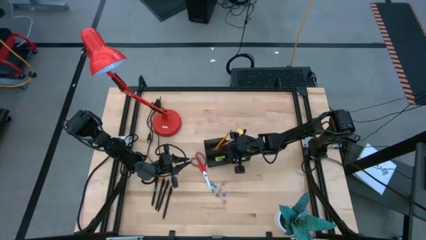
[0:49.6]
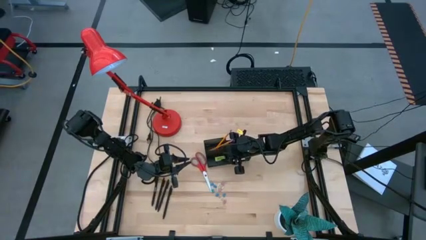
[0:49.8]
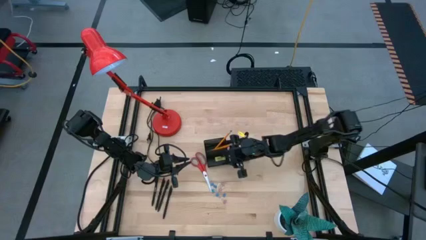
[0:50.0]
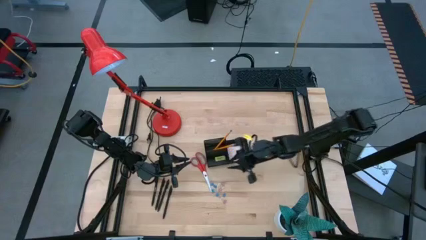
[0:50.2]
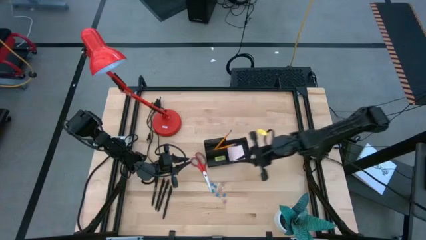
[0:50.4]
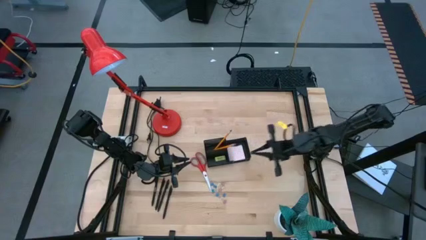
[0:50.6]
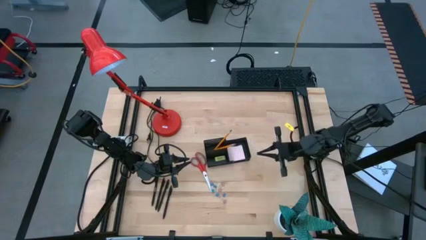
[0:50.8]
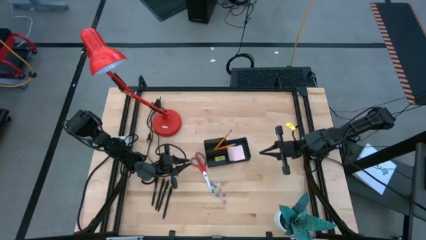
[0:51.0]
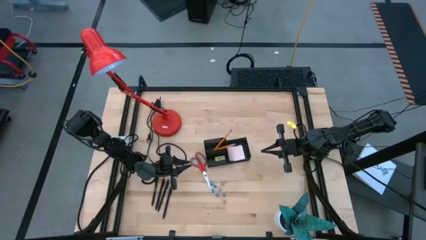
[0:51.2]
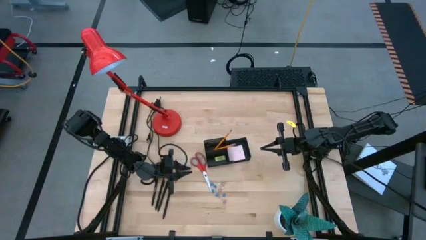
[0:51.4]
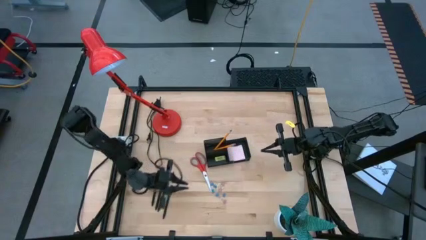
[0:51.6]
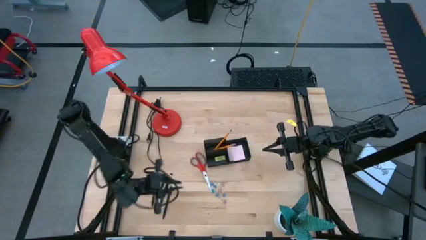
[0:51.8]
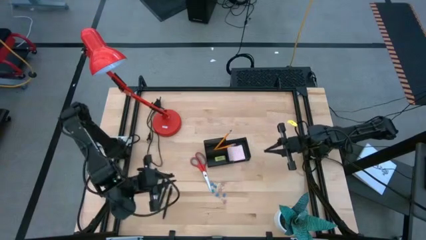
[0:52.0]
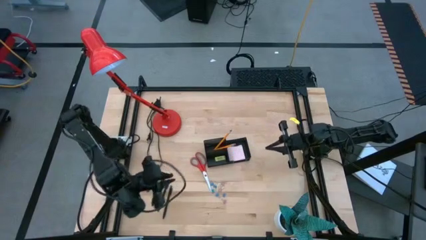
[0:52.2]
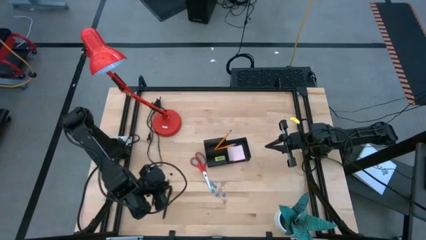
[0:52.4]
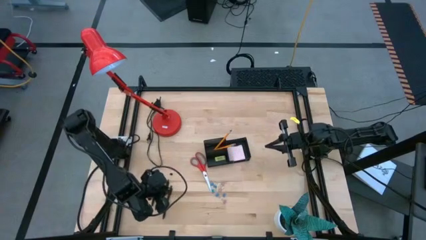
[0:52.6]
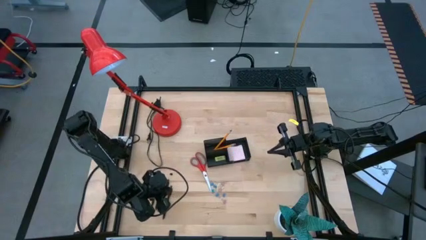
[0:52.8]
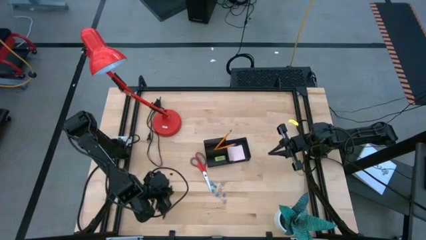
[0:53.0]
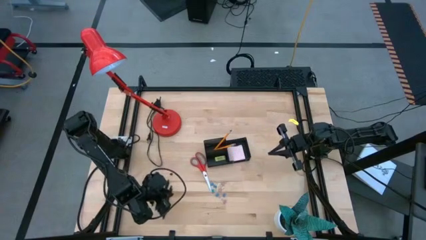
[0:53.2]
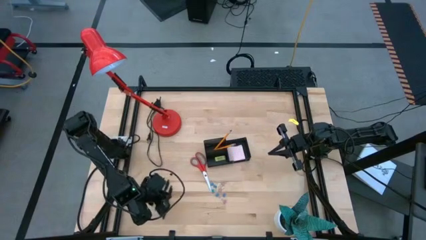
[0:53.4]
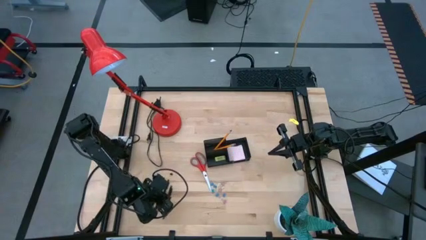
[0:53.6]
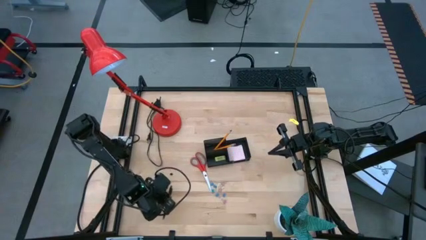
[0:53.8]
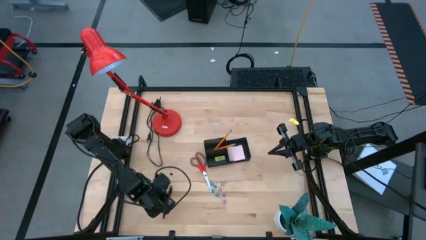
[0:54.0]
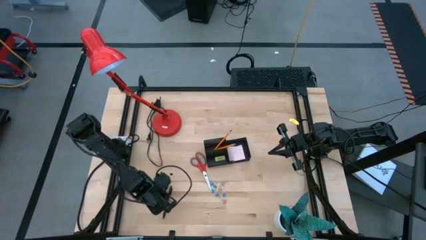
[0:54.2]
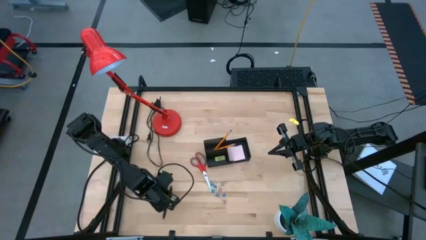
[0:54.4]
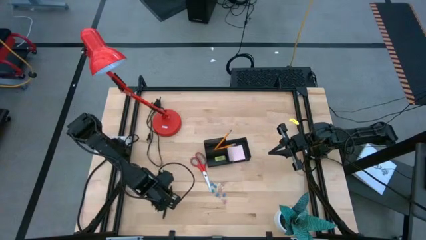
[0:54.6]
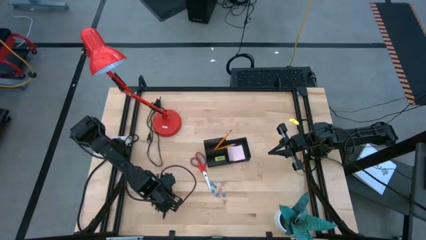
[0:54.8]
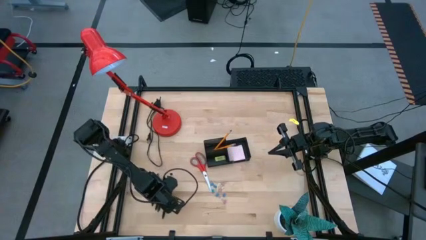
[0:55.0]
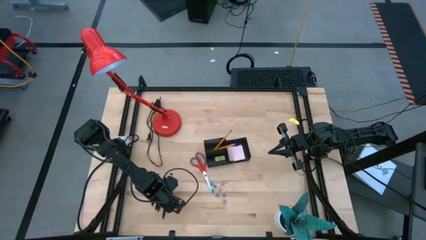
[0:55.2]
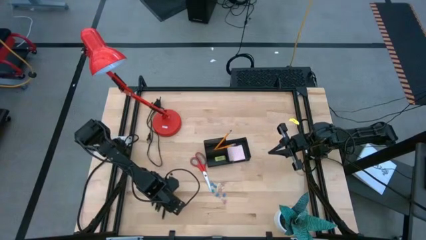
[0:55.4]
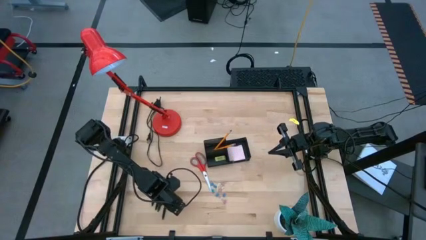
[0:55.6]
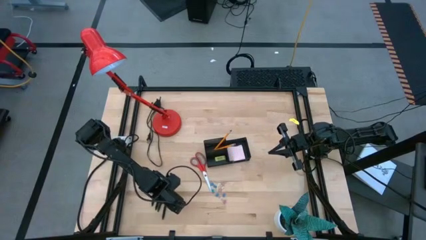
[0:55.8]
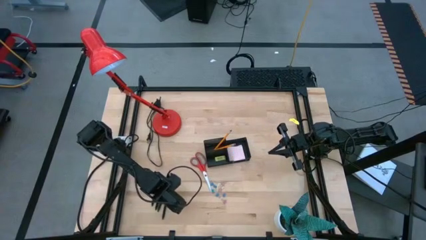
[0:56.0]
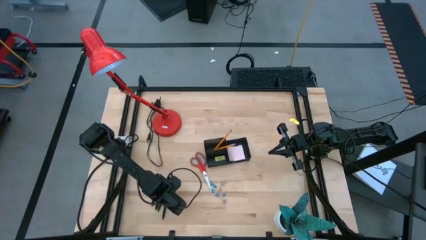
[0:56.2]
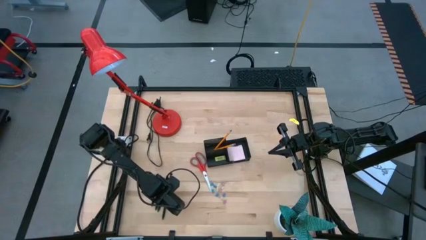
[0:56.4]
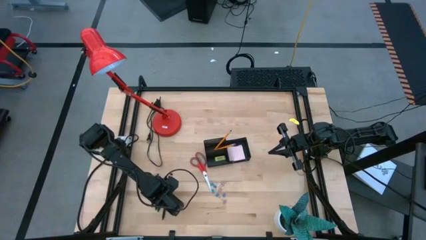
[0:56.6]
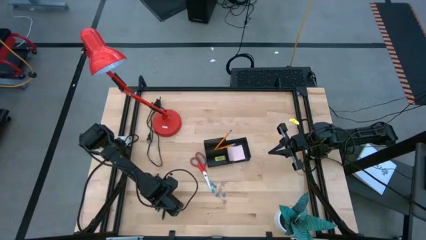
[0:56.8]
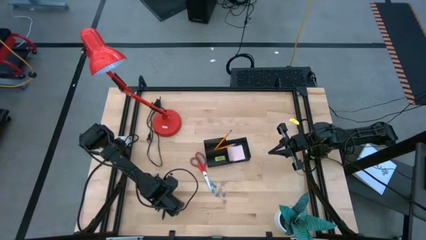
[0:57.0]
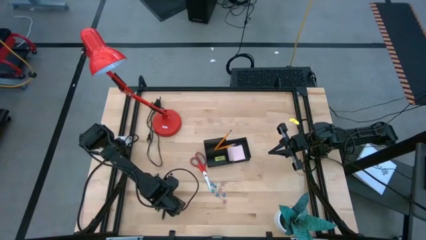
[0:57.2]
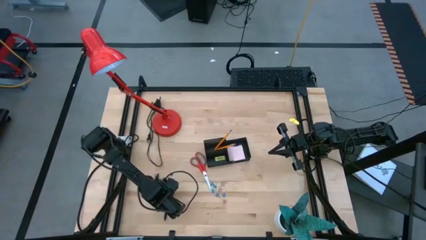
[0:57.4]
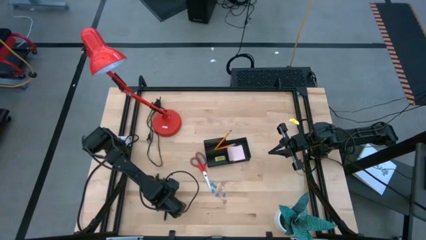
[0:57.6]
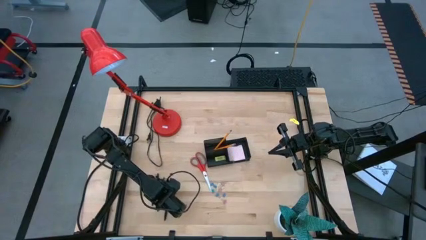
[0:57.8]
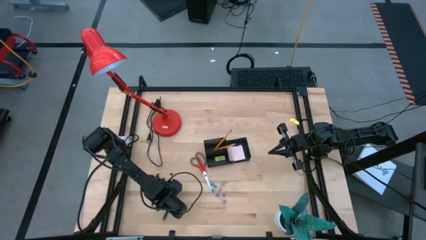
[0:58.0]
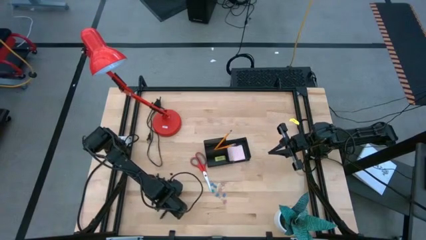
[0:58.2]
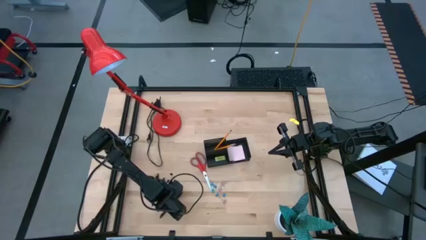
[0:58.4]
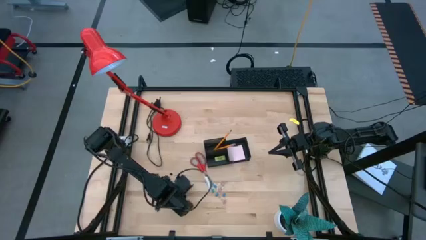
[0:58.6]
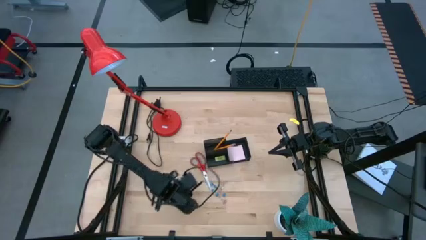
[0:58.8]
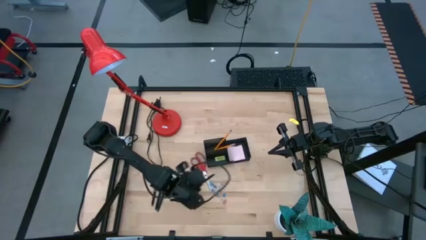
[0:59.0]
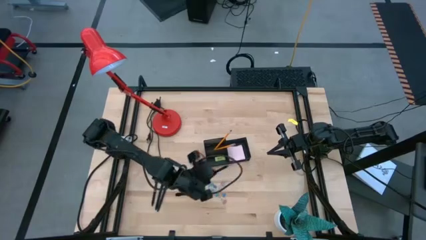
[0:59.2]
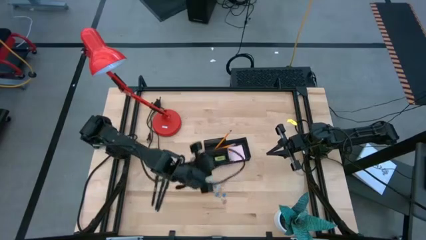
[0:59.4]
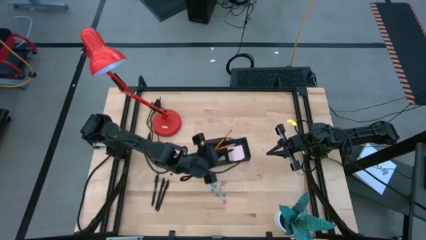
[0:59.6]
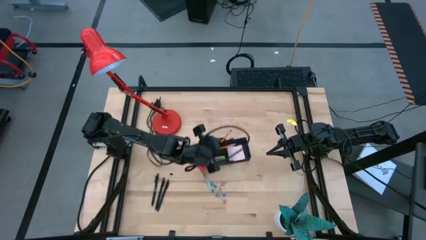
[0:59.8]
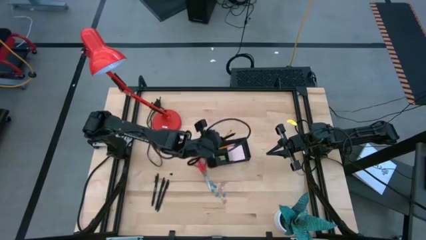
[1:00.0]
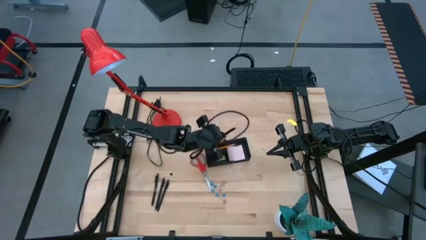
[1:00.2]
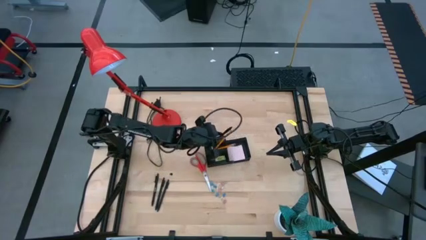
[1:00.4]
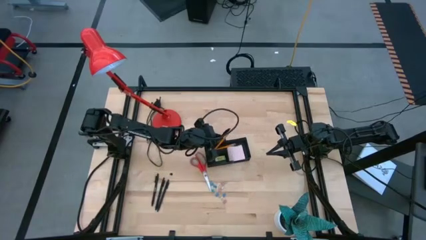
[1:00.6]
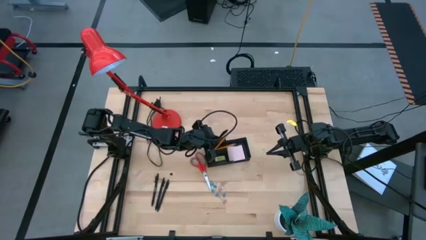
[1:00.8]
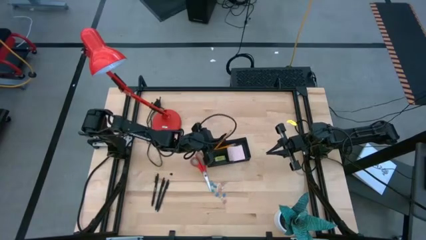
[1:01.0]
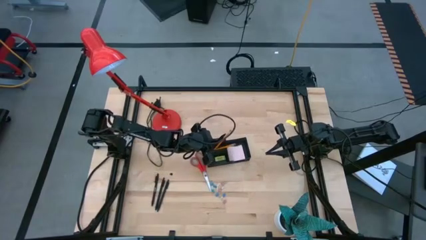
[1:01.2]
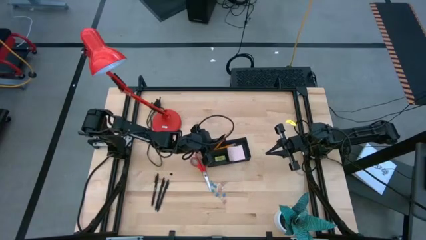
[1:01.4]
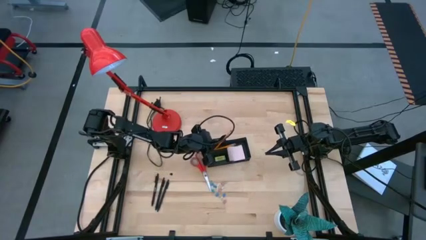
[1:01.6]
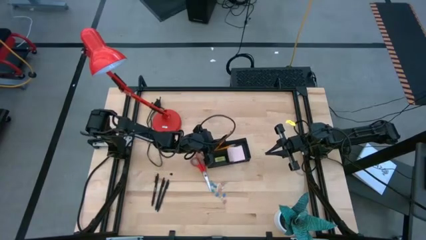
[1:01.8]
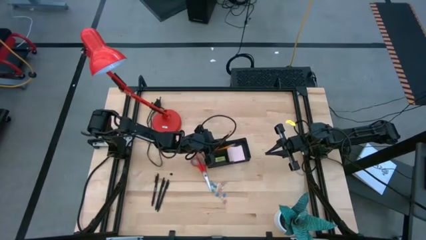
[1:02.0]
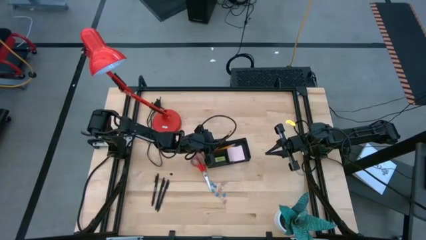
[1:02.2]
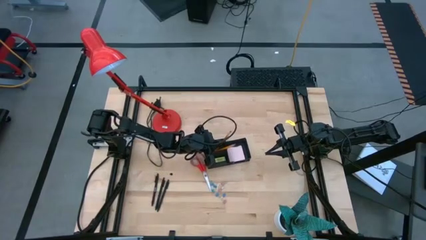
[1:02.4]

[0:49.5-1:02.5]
Task: Pick and place office supplies into organizer
Put the black pen into the black desk organizer

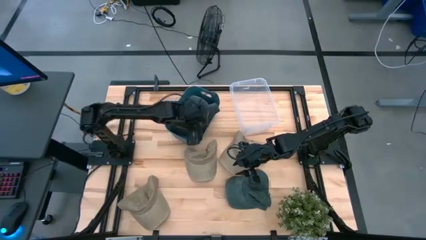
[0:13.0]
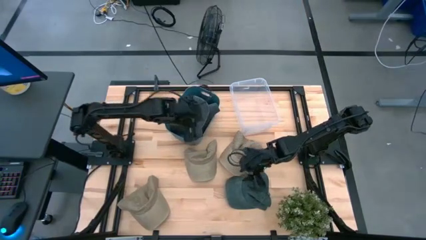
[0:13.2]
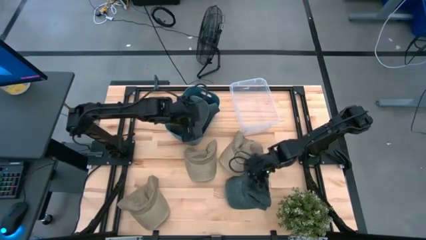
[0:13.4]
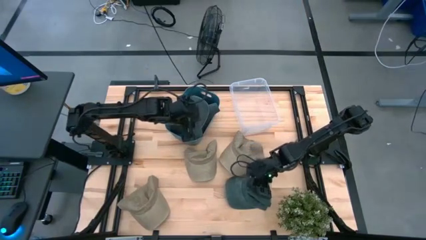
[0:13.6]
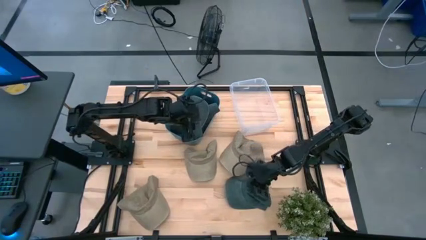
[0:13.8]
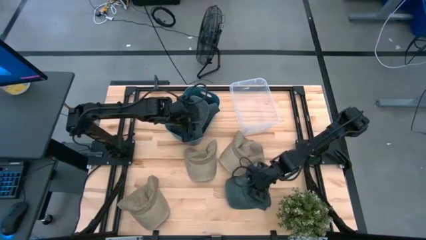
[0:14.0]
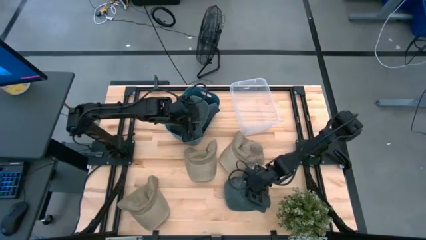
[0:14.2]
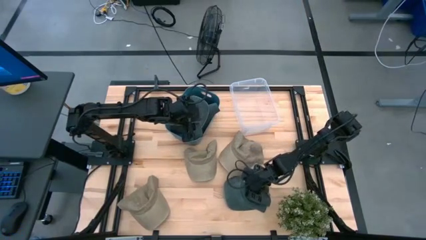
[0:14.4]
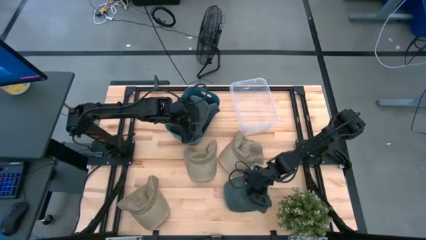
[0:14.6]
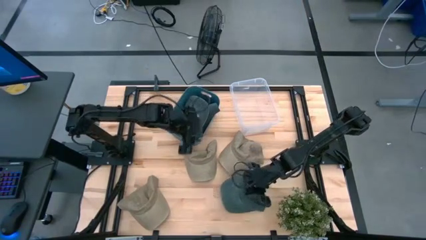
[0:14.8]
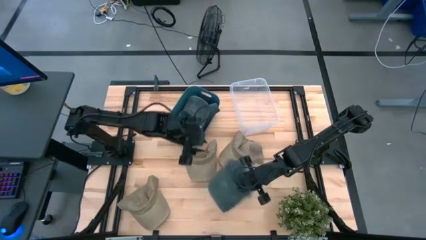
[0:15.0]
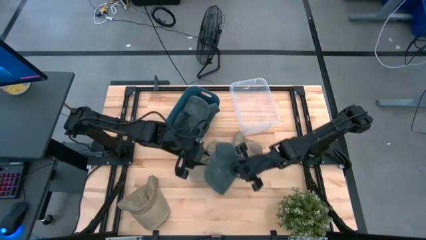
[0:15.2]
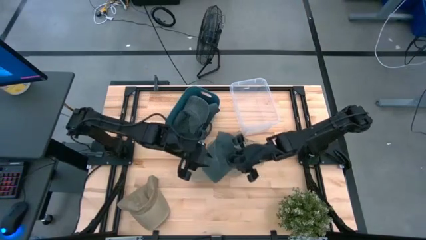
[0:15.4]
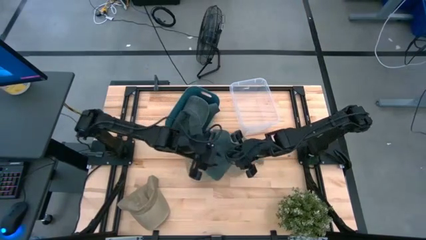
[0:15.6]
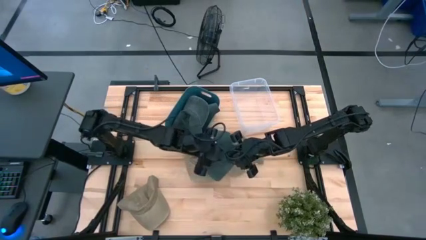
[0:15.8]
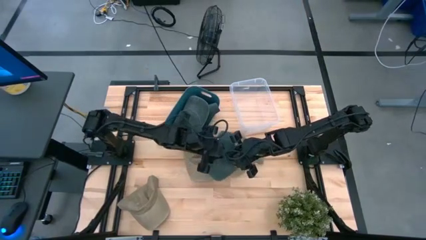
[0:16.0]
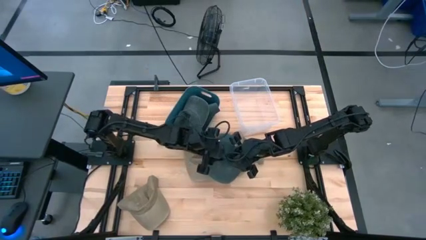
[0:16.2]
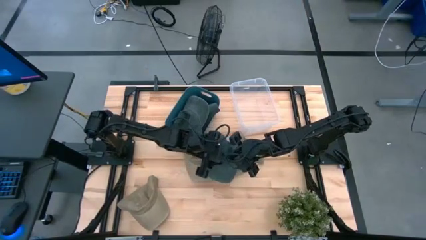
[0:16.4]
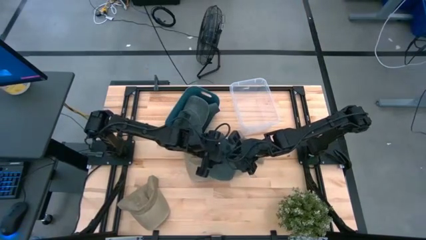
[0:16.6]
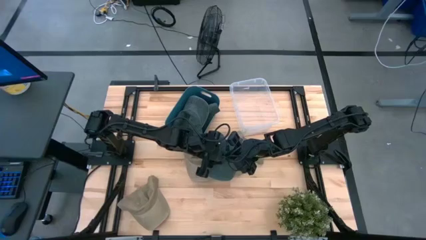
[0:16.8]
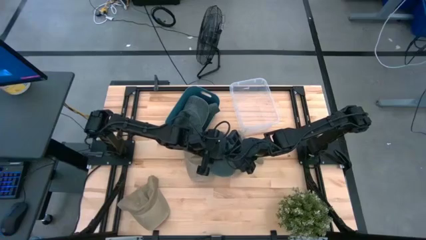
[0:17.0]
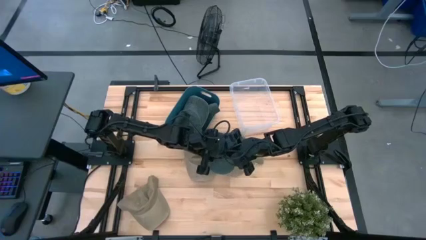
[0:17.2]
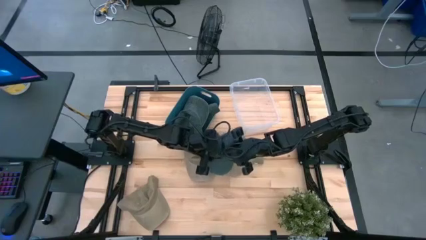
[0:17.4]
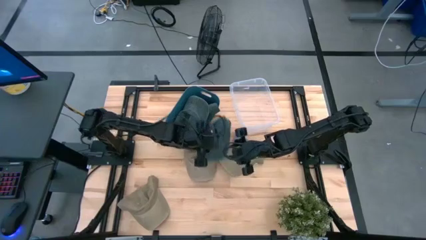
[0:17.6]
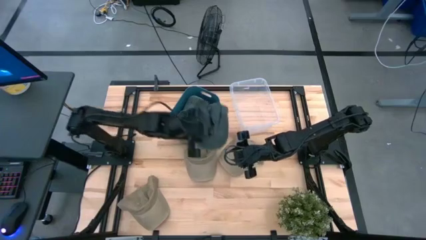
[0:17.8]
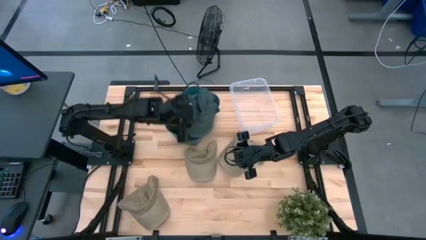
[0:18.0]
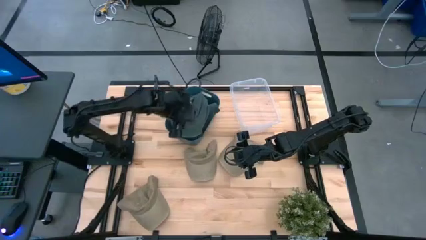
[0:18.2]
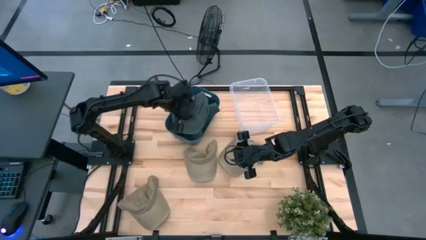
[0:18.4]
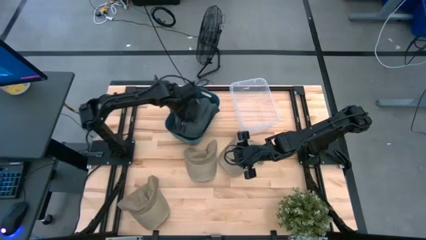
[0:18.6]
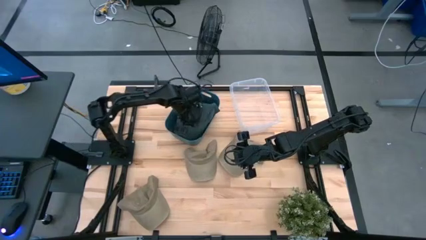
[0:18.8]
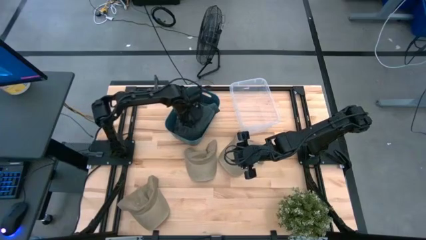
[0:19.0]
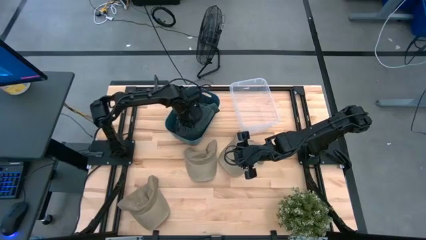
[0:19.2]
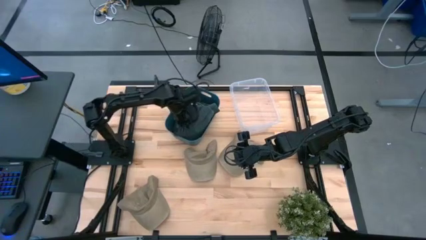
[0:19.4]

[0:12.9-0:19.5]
Task: Pick & Place hat
Put the black cap into the blue bin
